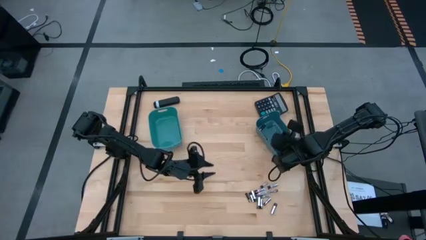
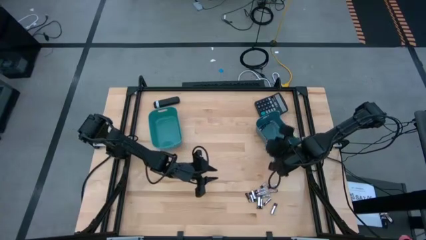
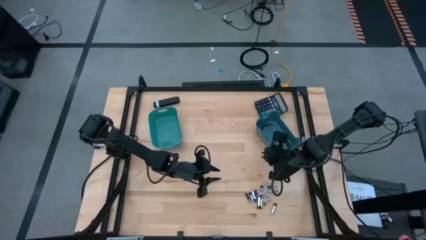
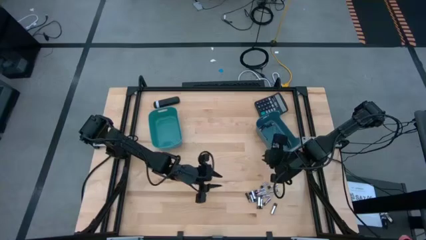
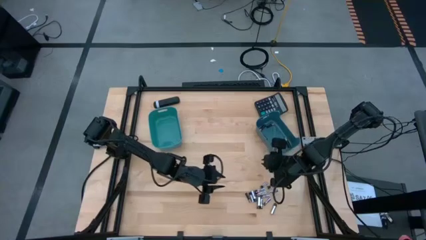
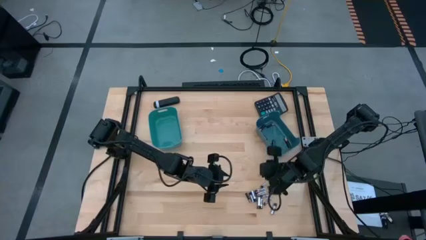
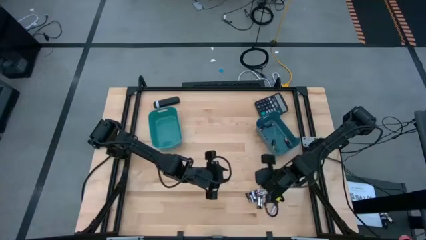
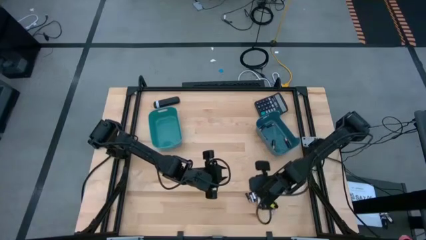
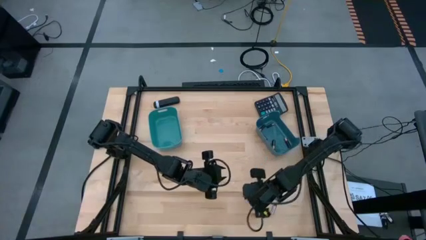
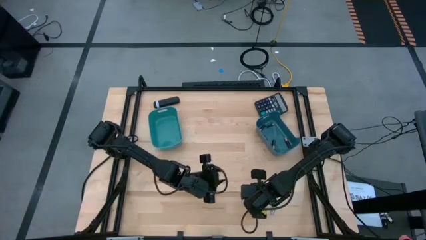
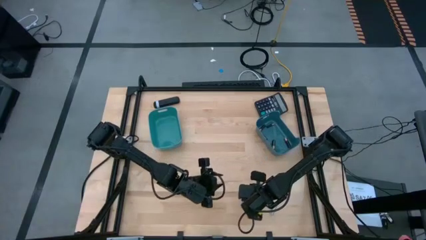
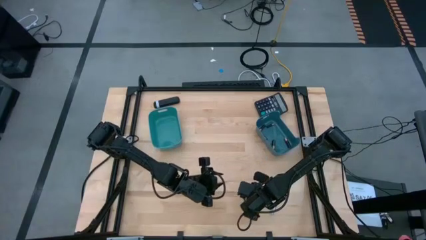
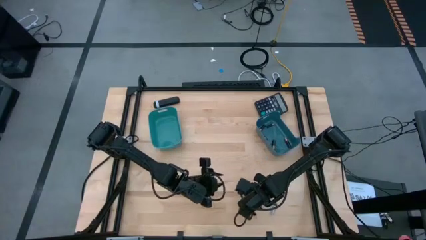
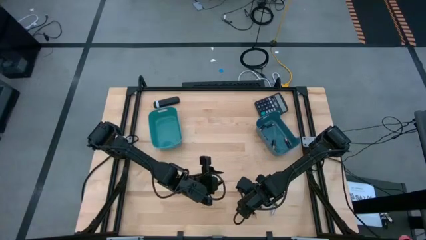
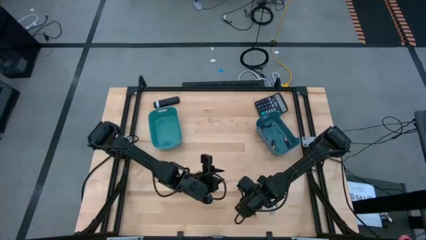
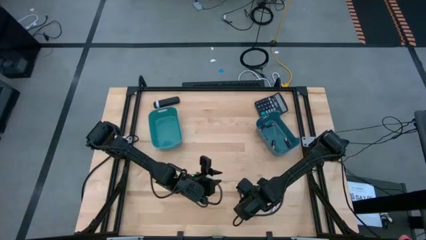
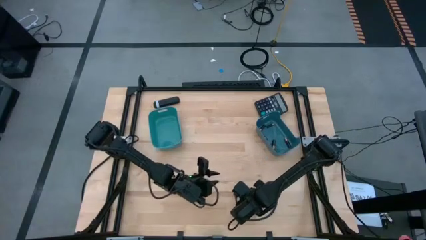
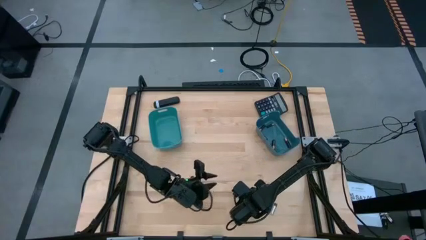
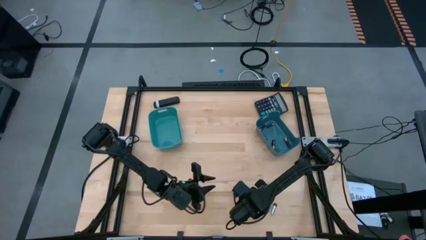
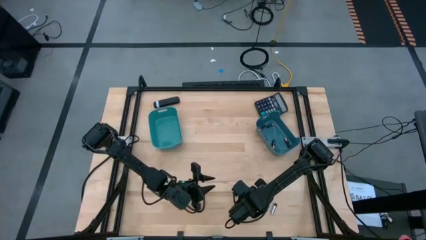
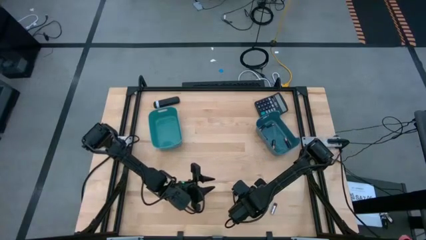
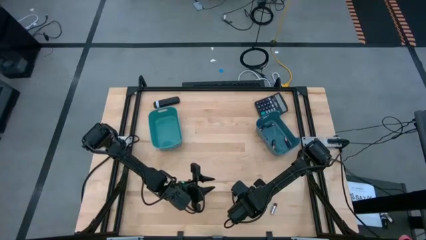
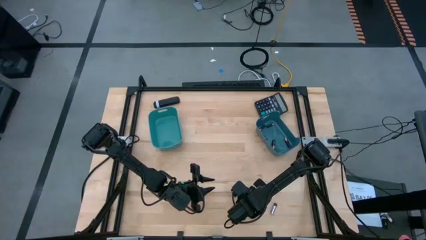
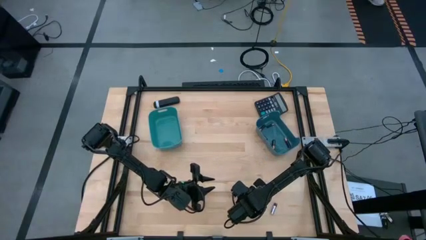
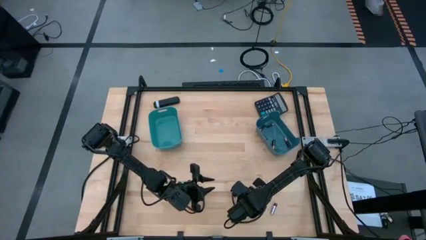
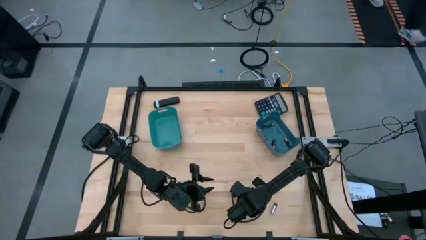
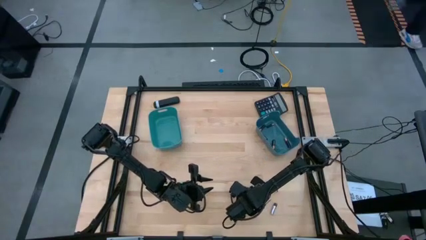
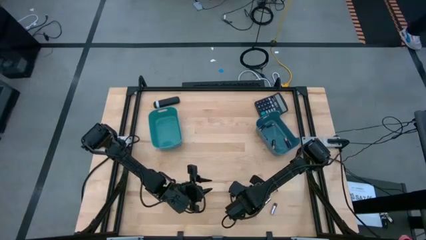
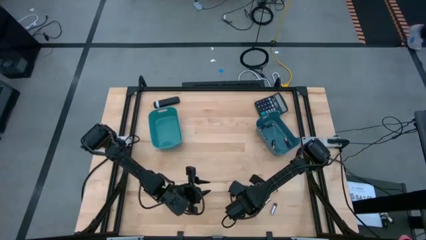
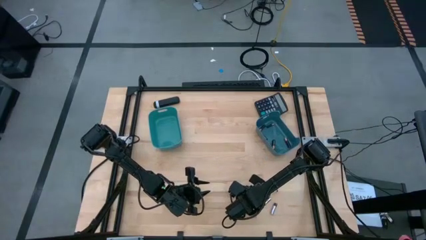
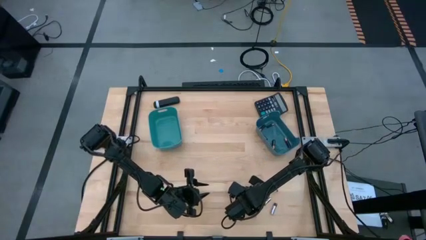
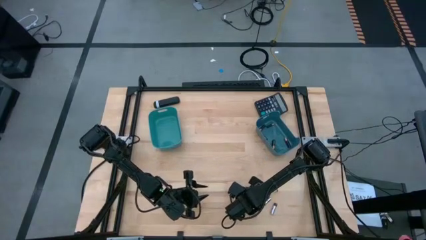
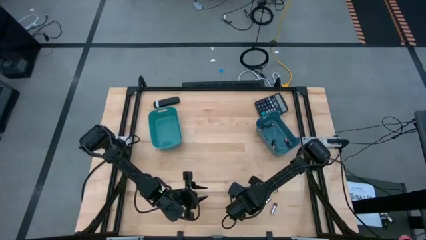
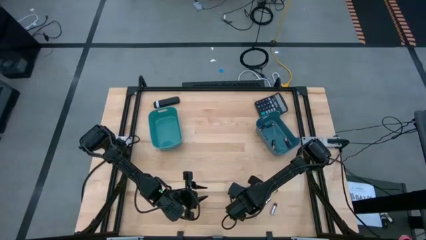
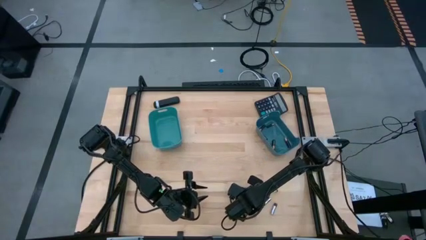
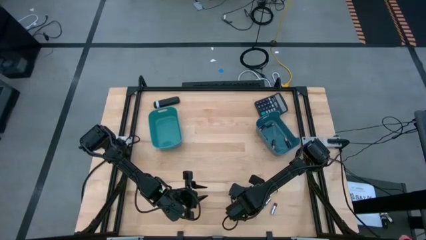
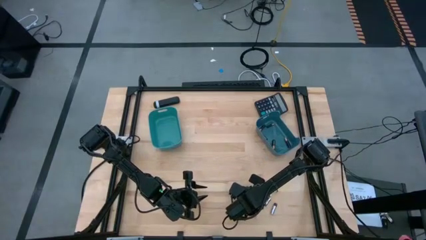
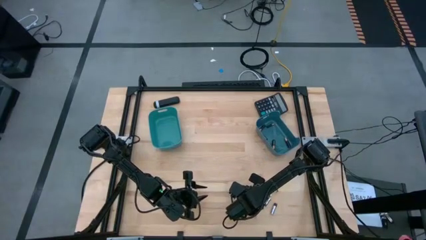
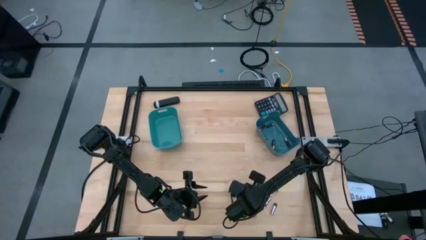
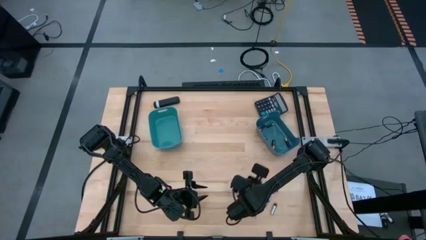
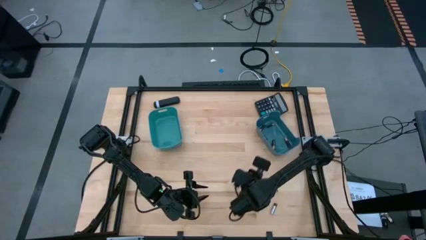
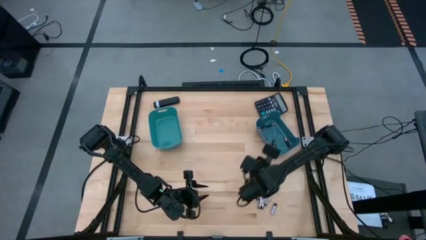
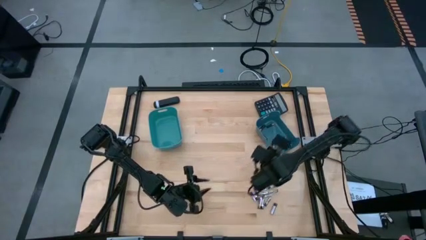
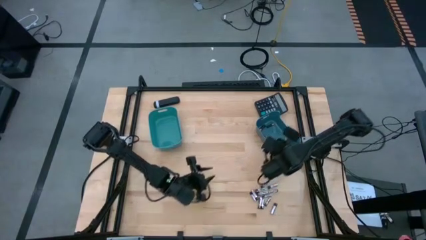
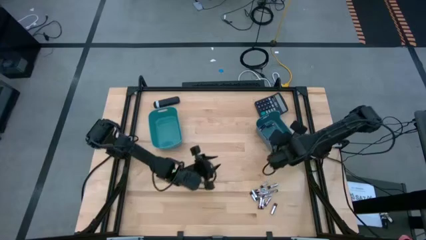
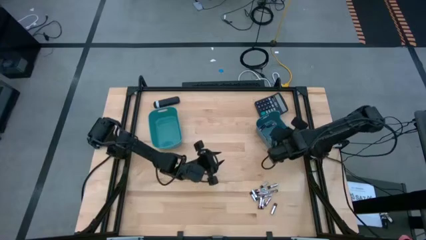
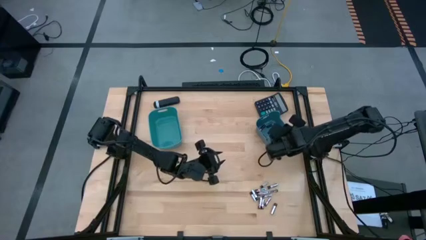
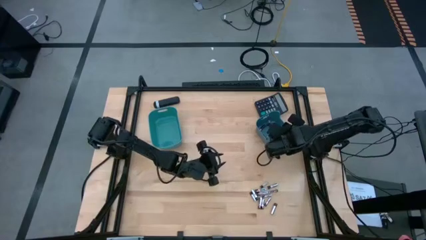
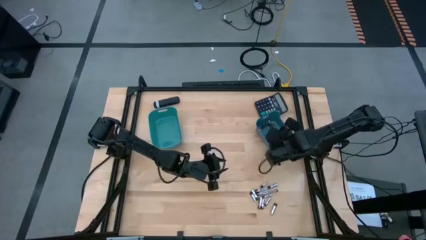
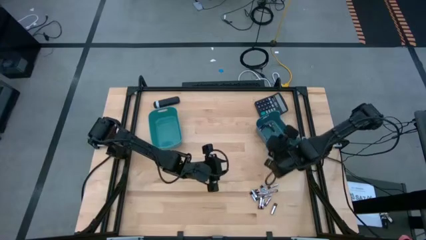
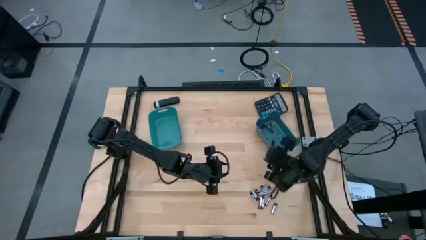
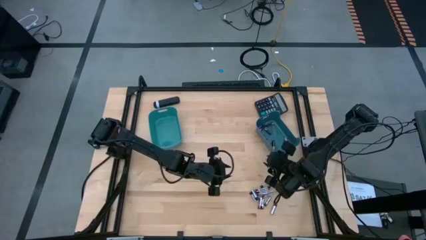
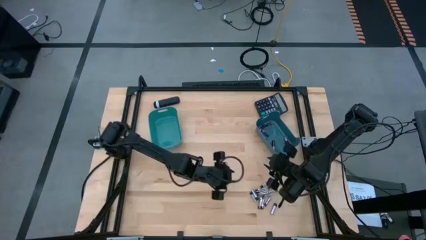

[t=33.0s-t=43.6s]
Task: Sort batteries
Put the black battery into the dark blue bin

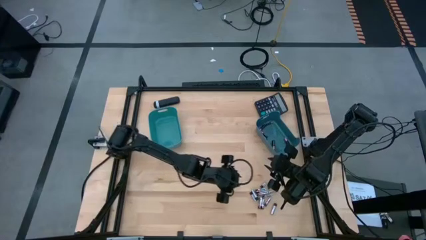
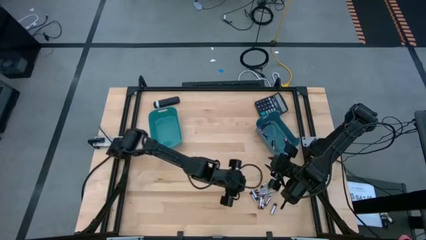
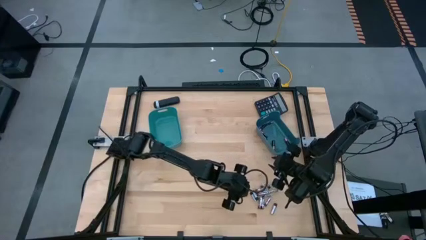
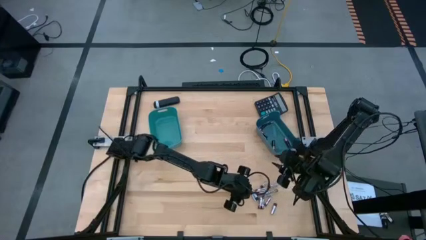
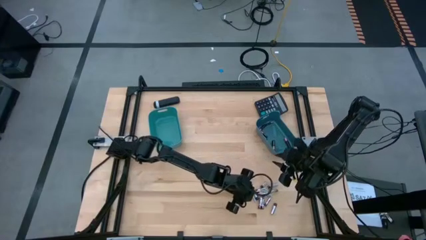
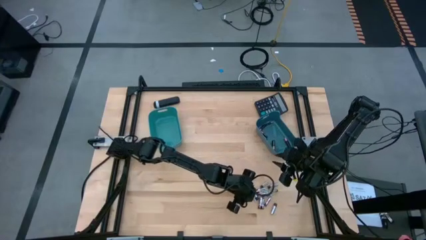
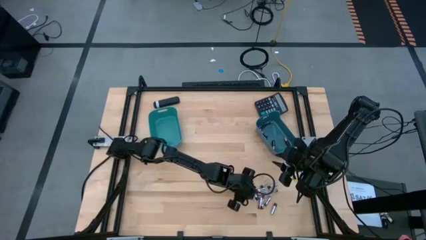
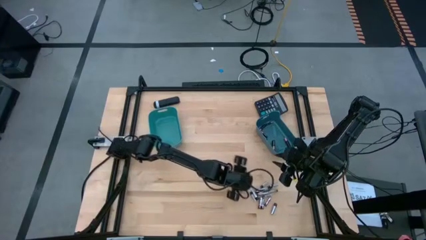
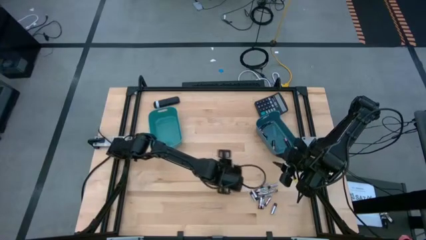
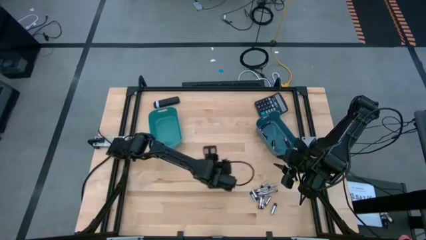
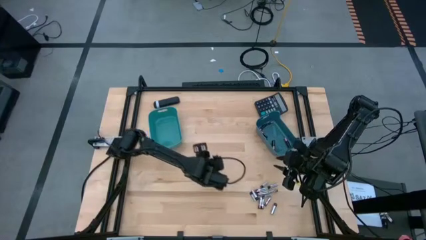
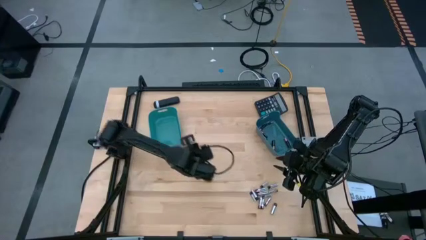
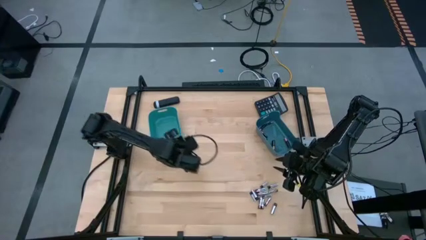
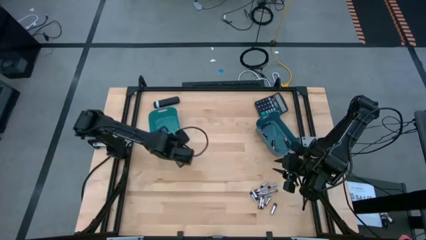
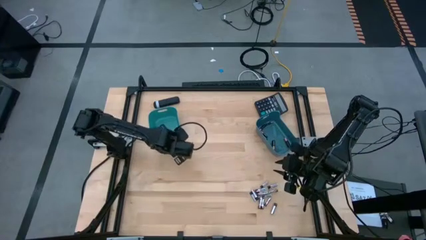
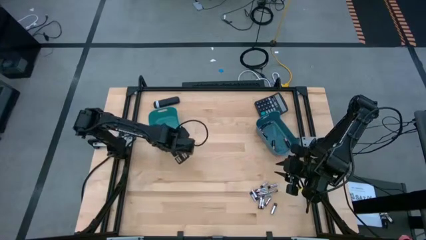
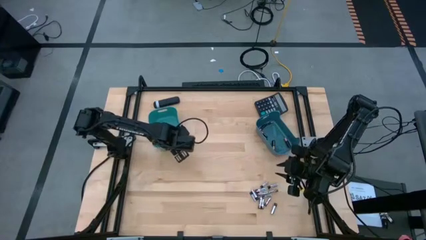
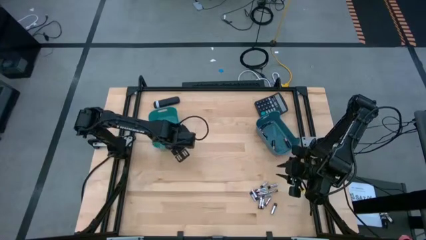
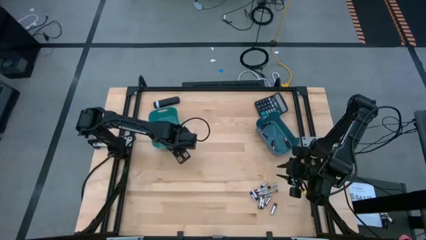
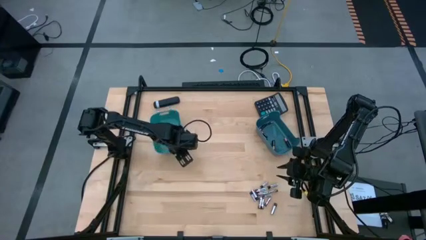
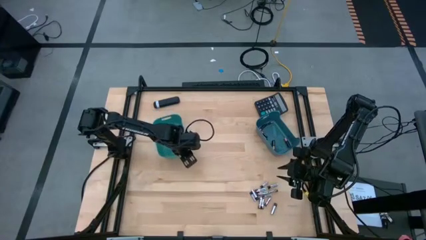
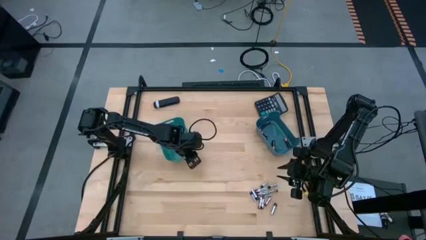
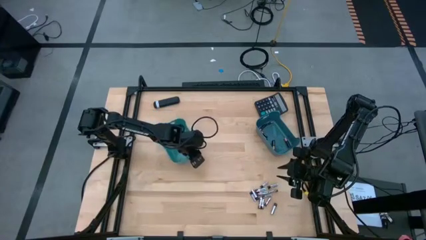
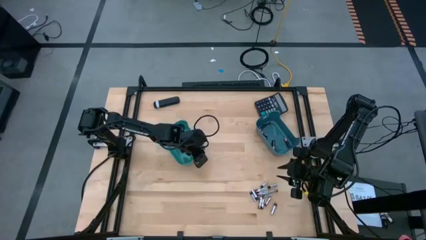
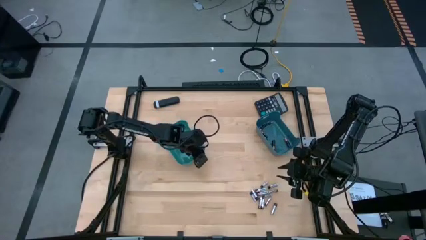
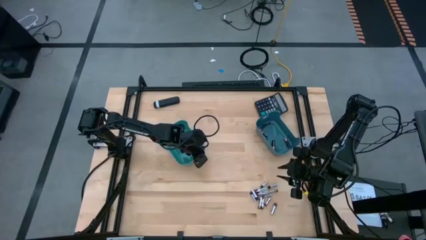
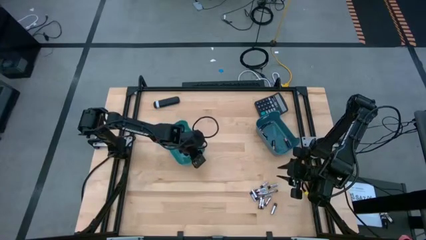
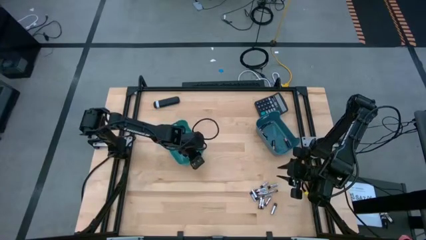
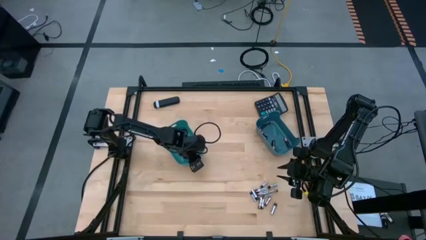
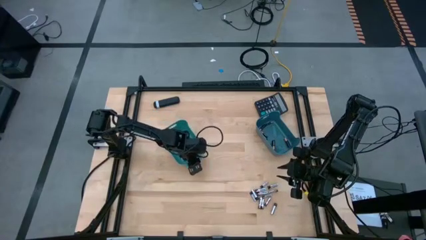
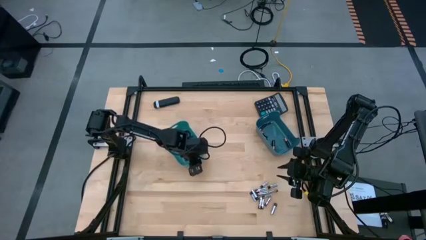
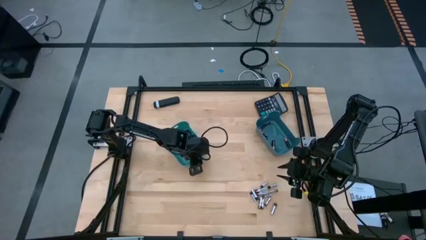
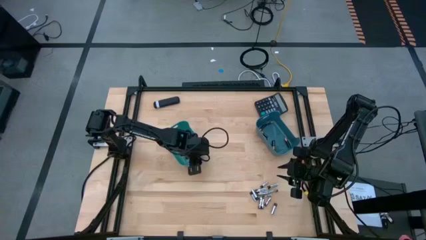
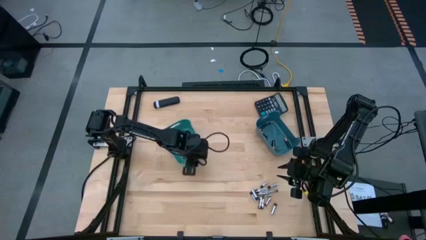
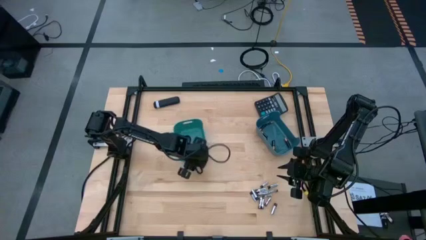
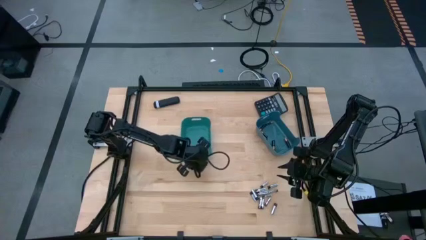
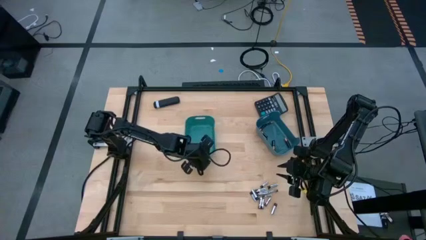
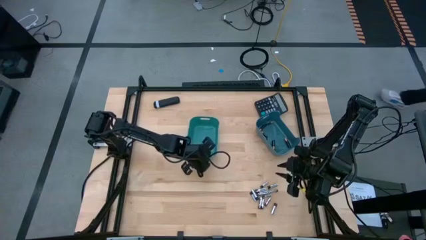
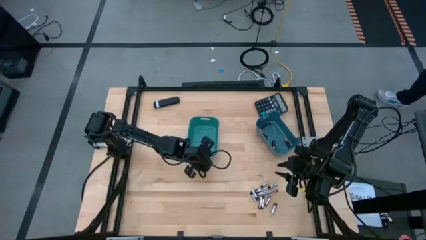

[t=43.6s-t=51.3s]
Move the green bin to the center of the table
